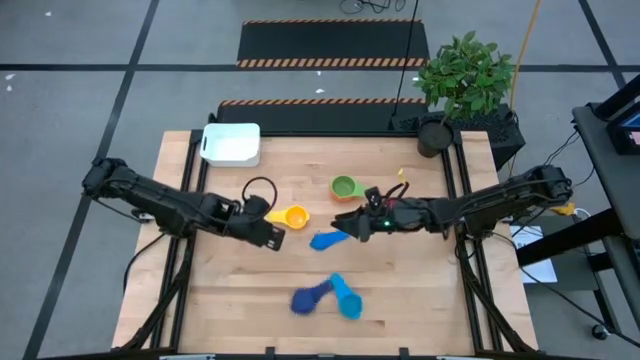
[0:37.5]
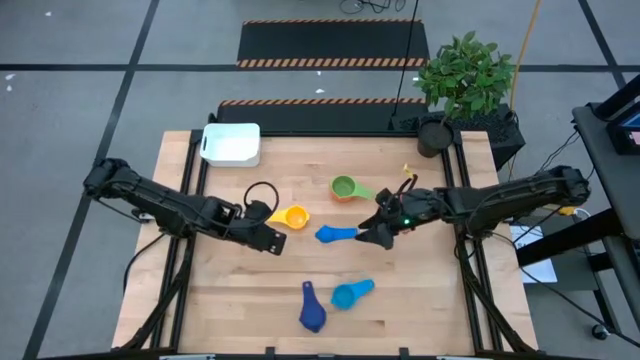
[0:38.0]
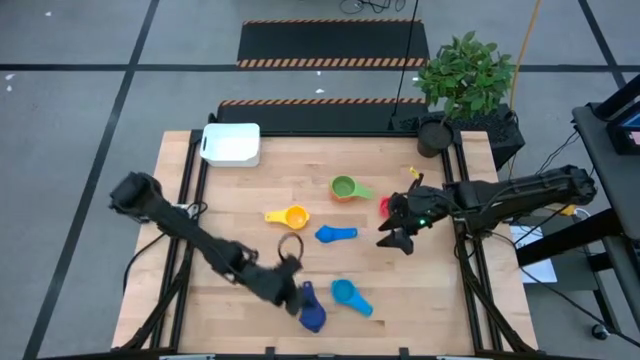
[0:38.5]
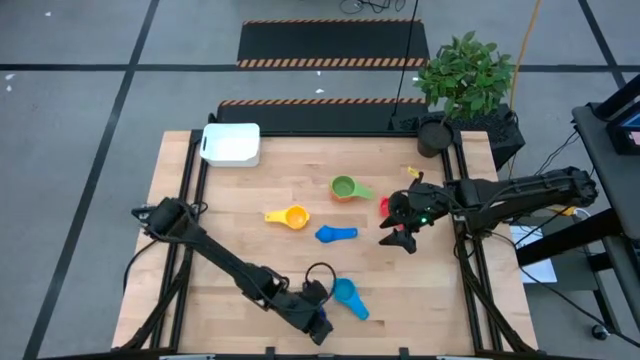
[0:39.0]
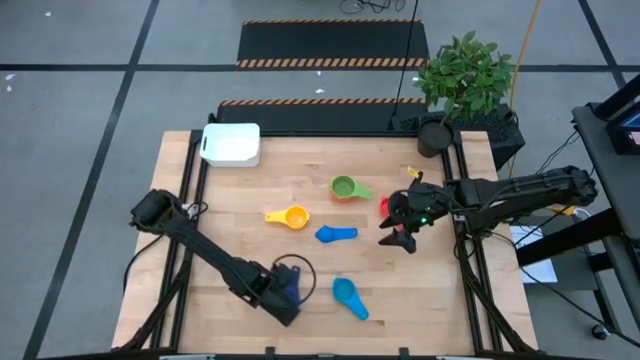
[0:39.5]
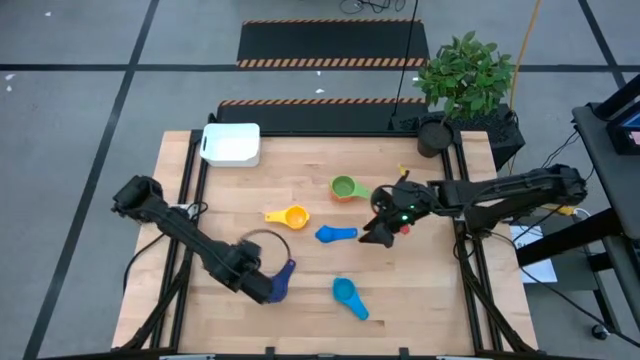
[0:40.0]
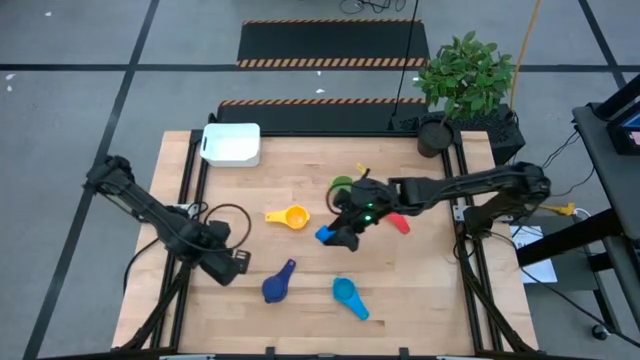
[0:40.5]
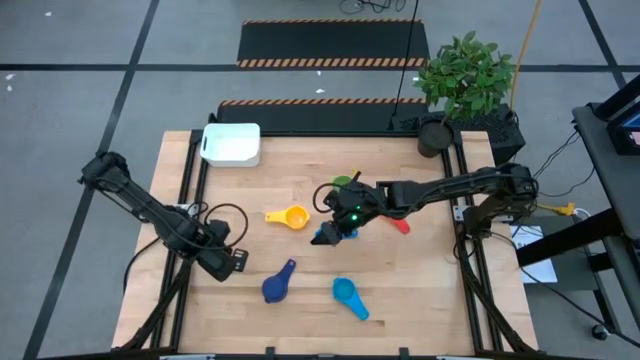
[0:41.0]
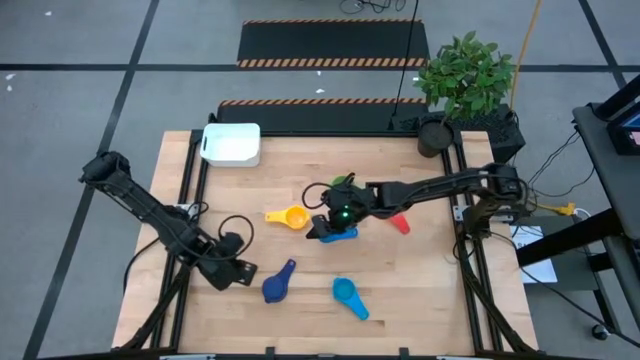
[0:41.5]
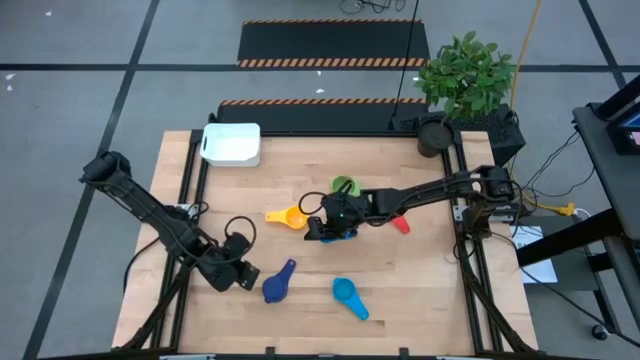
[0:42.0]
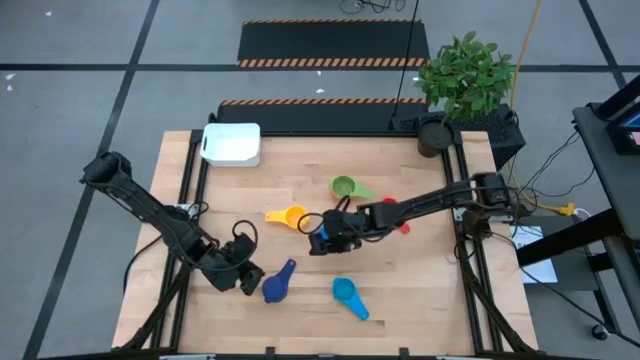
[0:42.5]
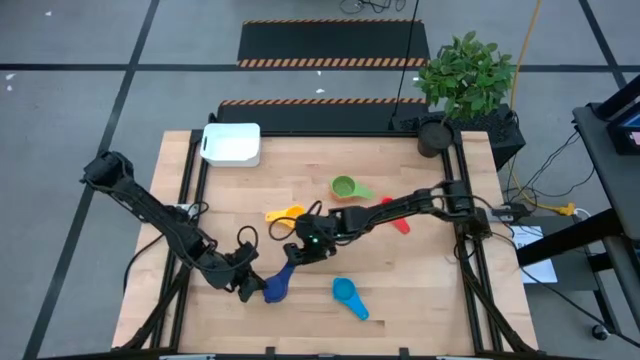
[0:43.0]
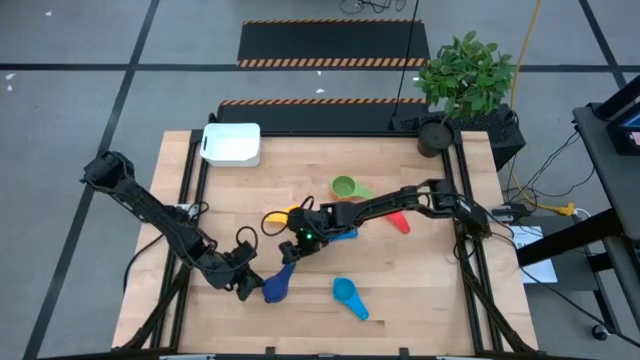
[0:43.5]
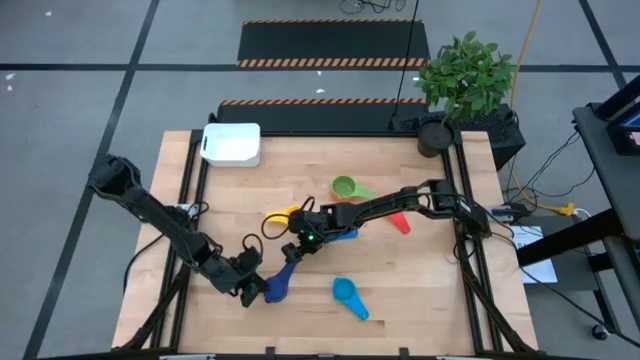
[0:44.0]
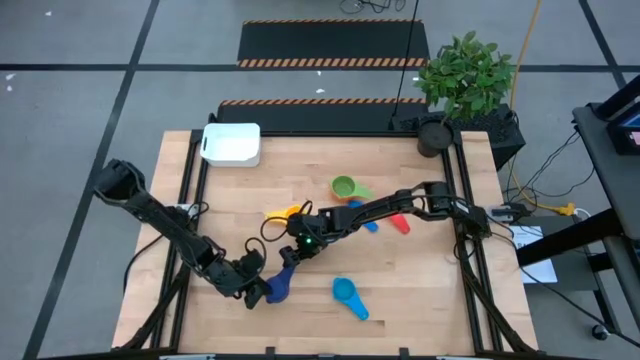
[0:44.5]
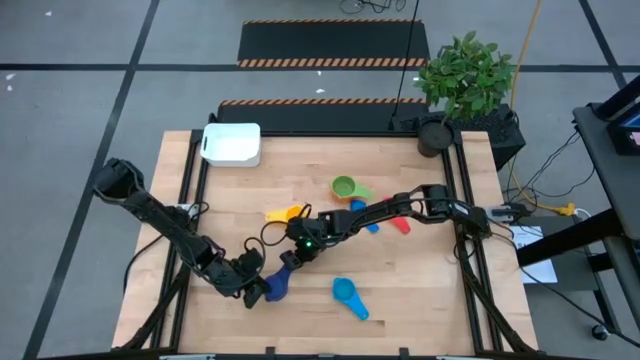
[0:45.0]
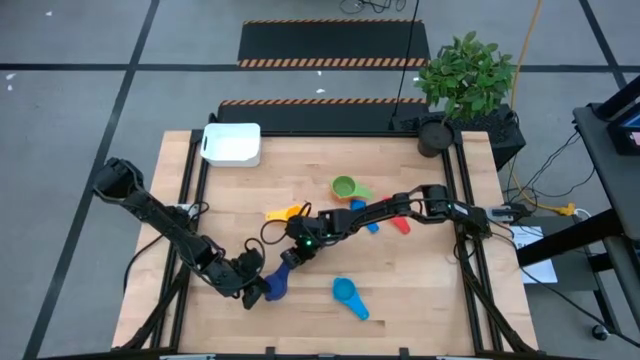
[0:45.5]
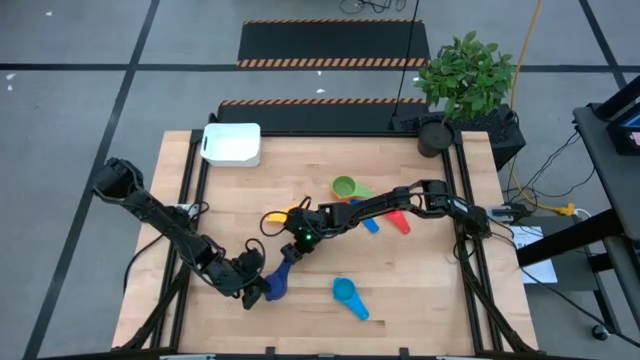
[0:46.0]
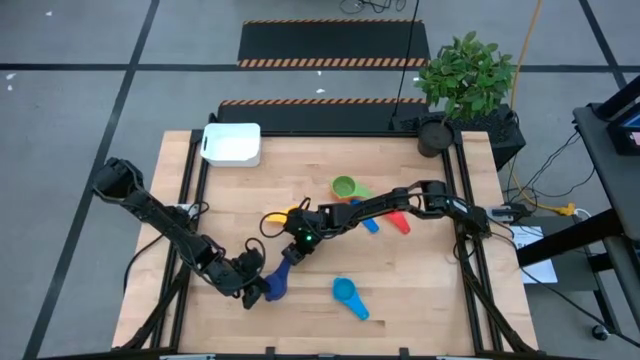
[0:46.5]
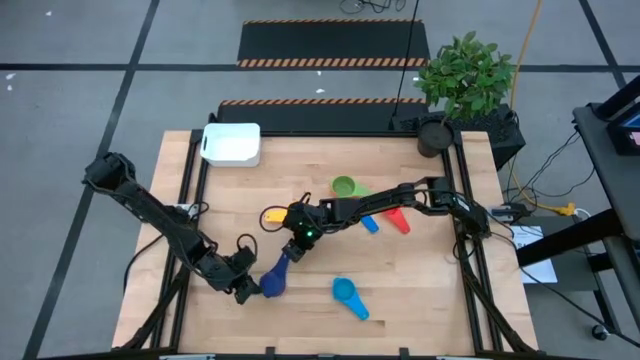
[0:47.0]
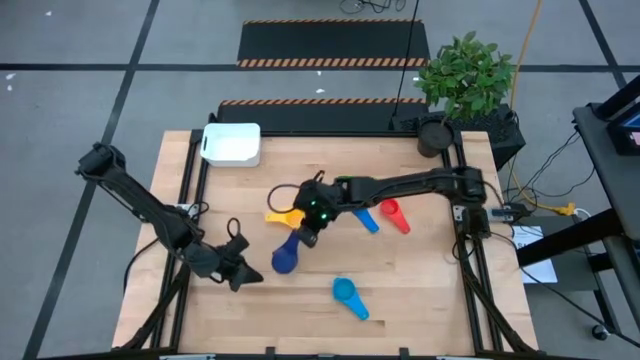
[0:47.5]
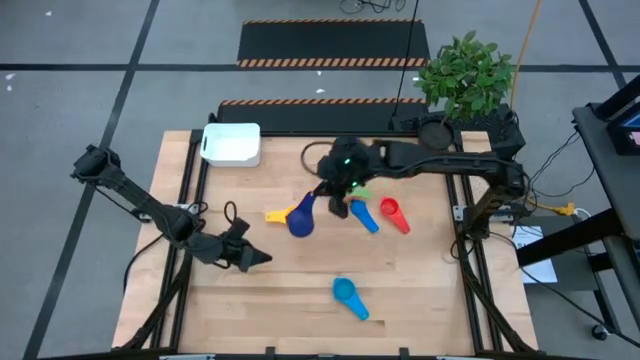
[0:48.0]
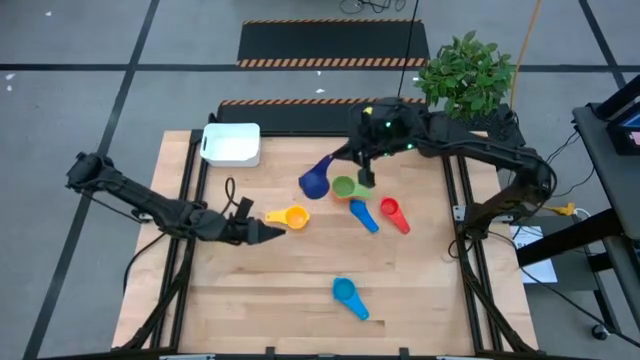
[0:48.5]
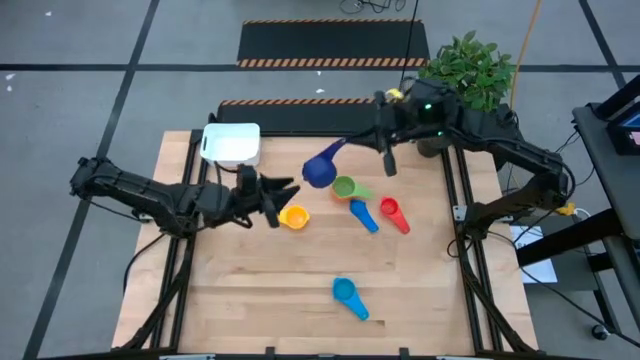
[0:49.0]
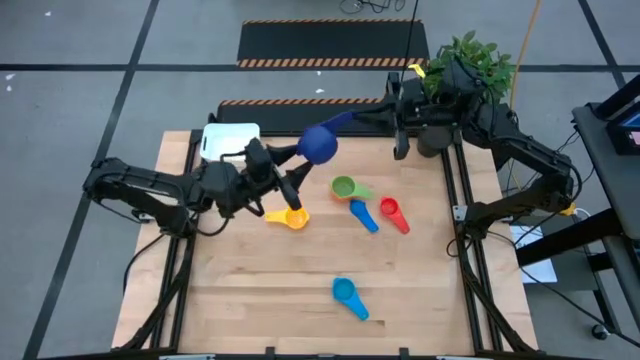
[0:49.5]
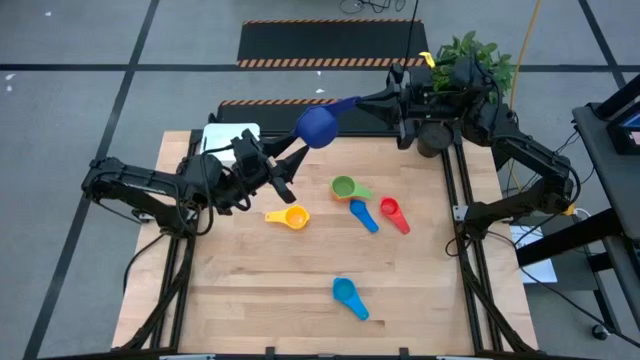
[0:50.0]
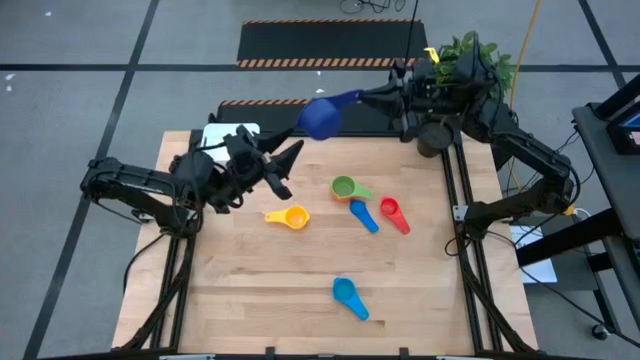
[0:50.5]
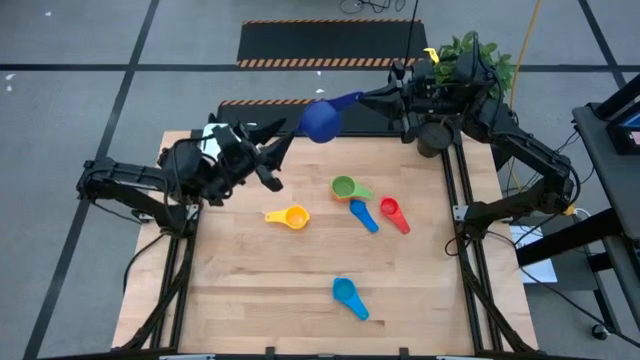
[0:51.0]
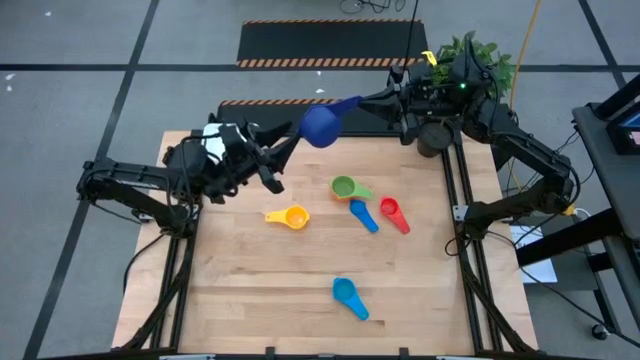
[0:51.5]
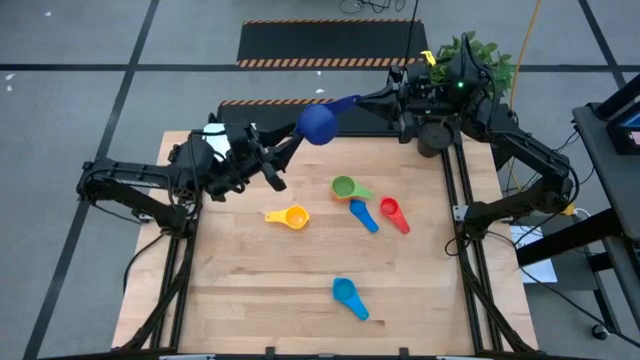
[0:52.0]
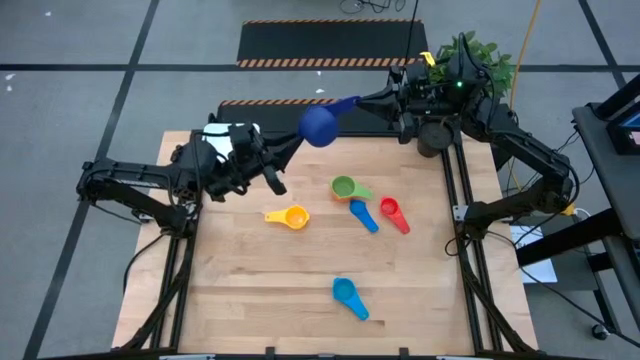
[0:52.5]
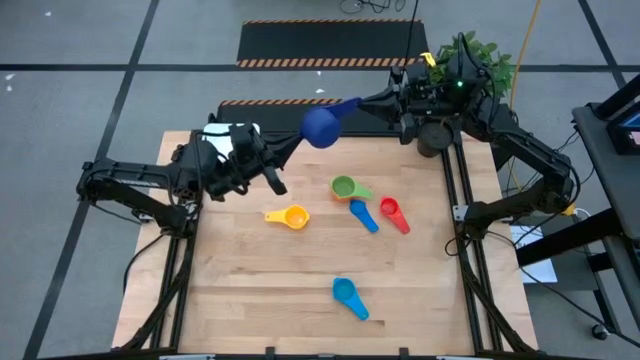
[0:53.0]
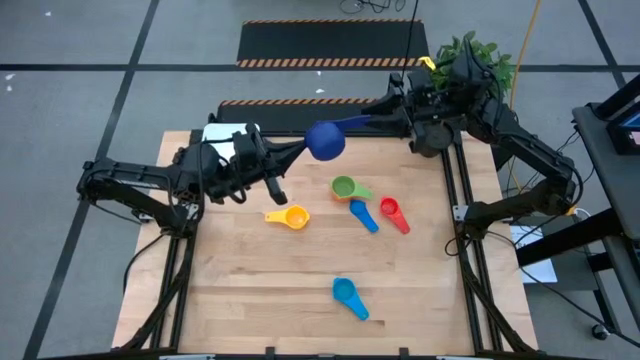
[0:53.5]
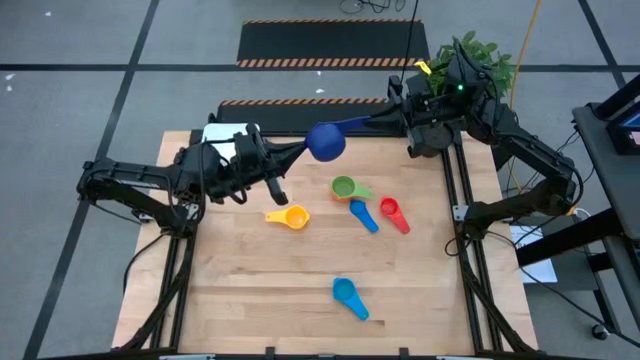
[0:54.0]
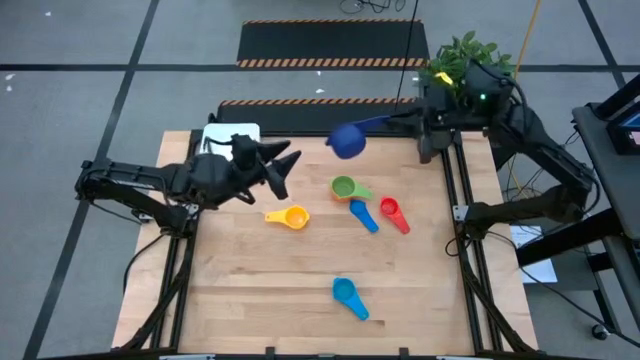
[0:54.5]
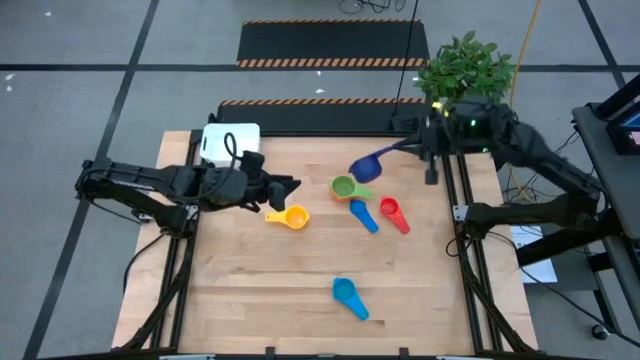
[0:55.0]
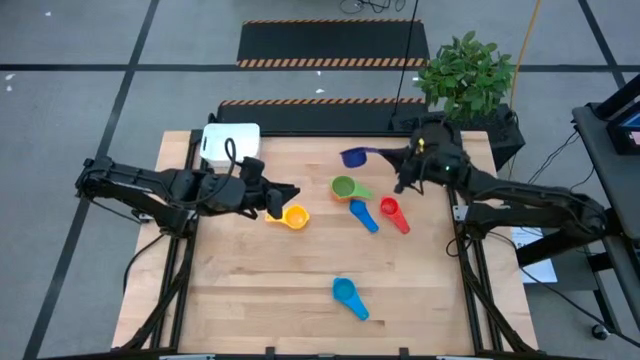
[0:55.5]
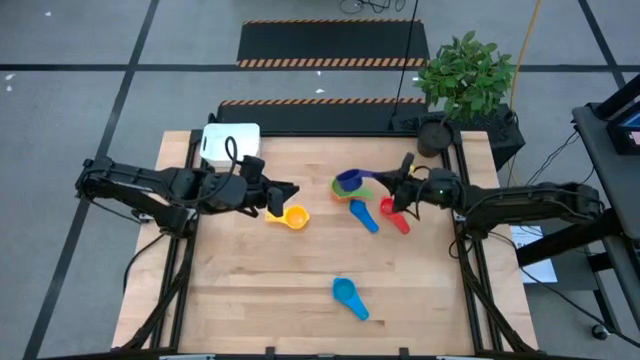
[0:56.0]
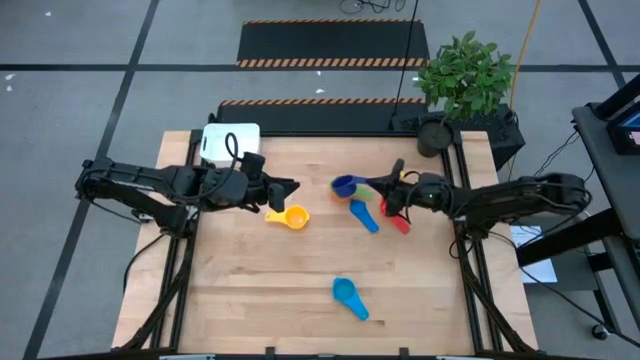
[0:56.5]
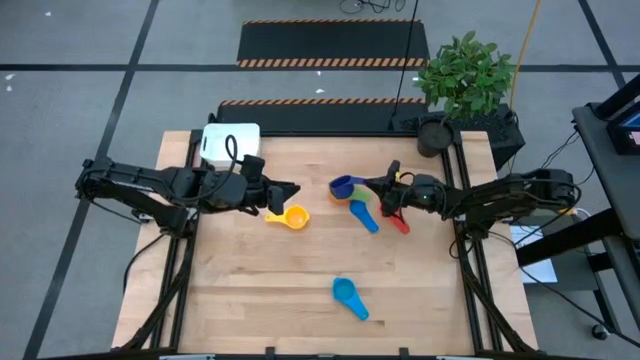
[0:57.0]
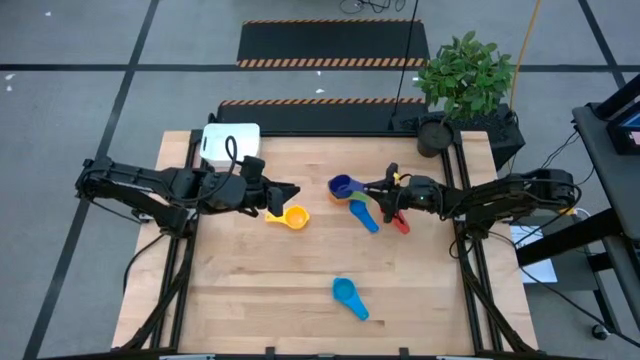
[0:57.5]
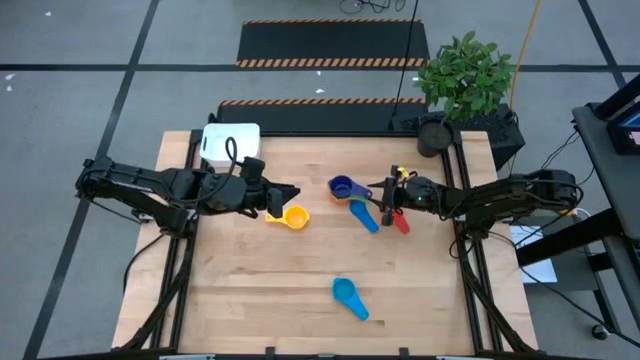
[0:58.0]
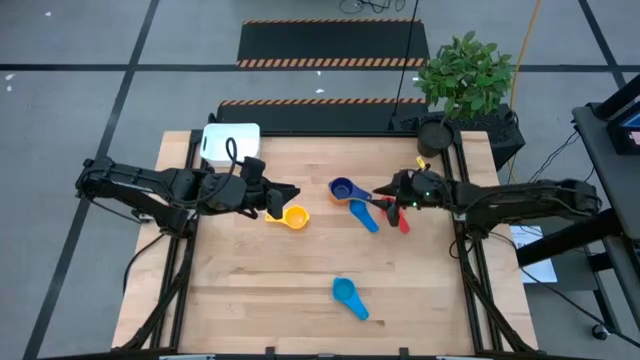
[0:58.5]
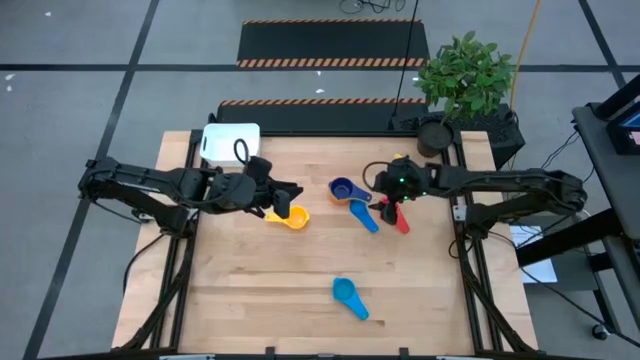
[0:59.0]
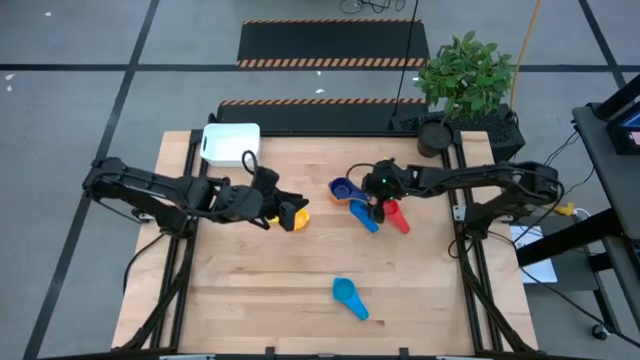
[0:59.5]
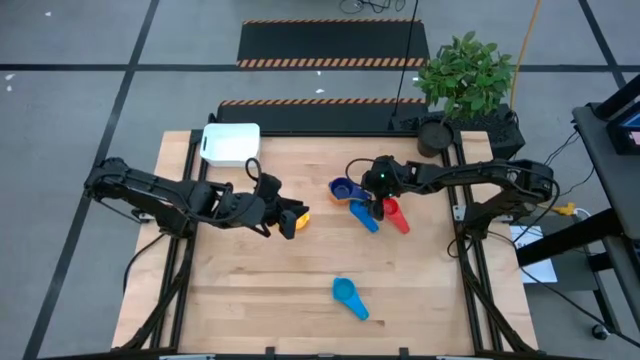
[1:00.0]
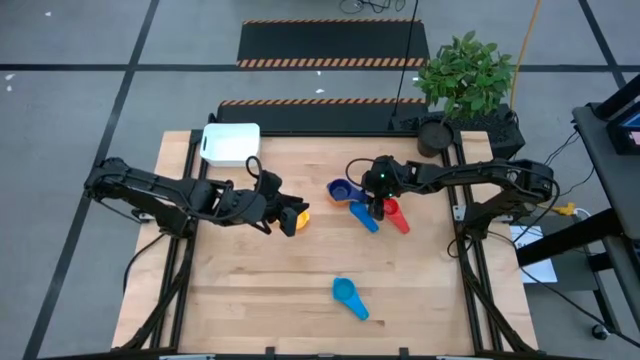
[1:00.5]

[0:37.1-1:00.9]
Task: Nest measuring cups in basket
Stack the dark blue measuring cup into the light green measuring cup
